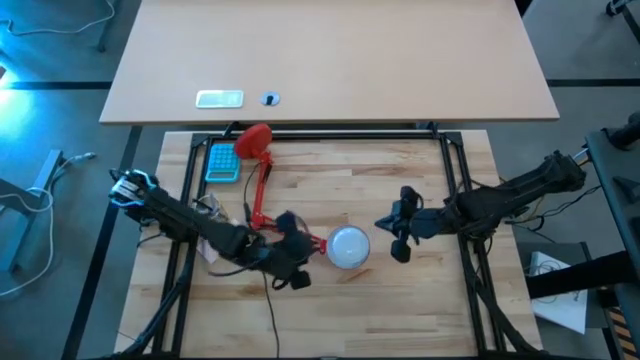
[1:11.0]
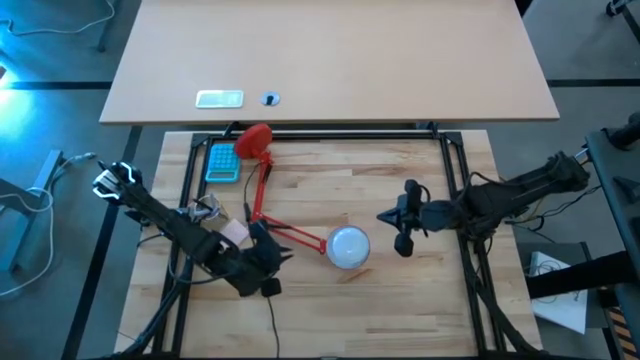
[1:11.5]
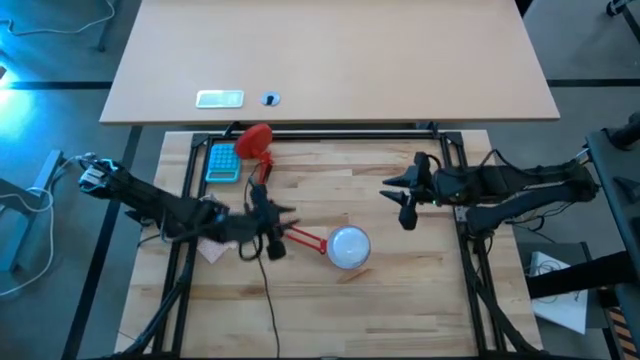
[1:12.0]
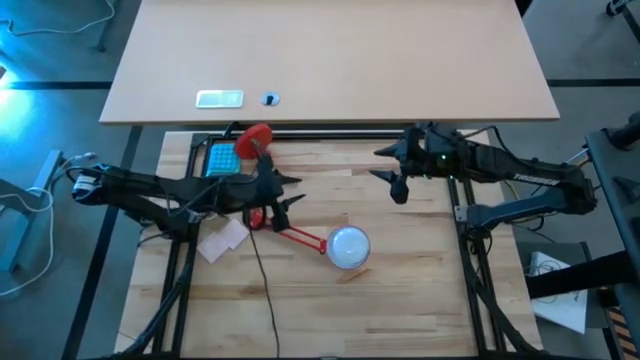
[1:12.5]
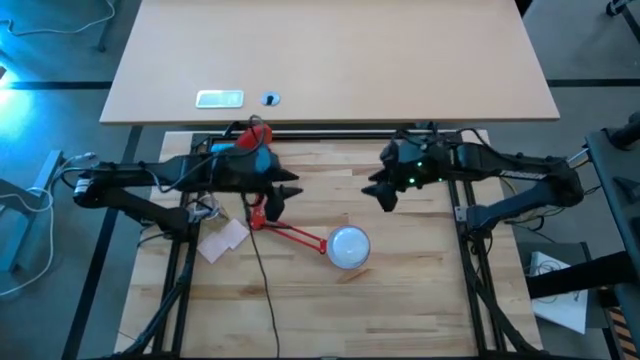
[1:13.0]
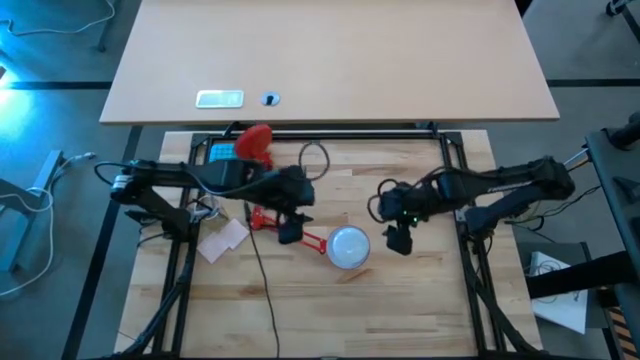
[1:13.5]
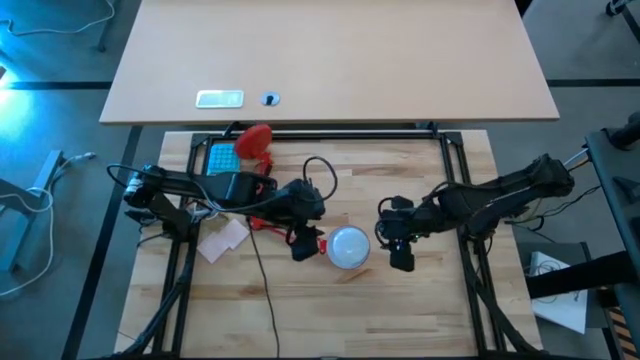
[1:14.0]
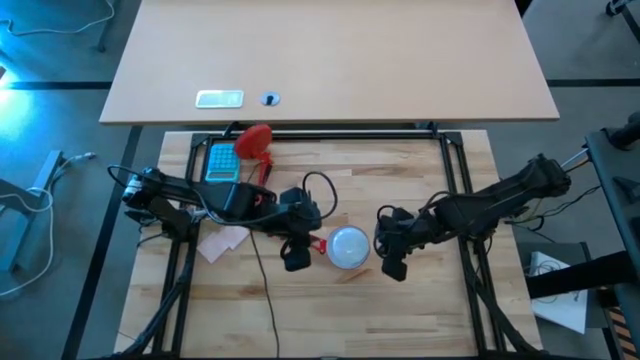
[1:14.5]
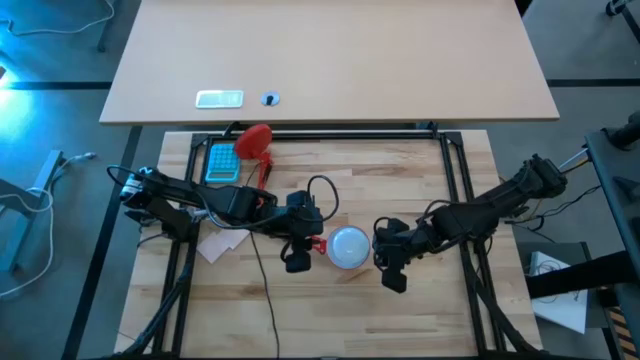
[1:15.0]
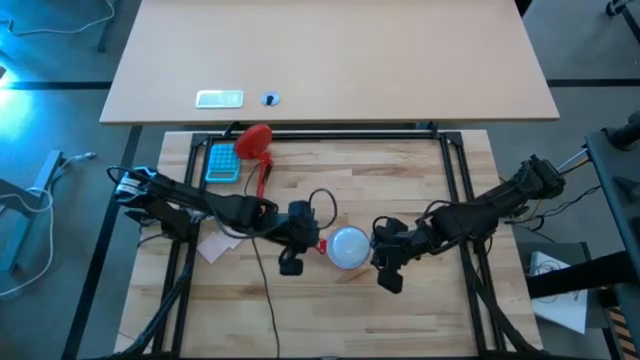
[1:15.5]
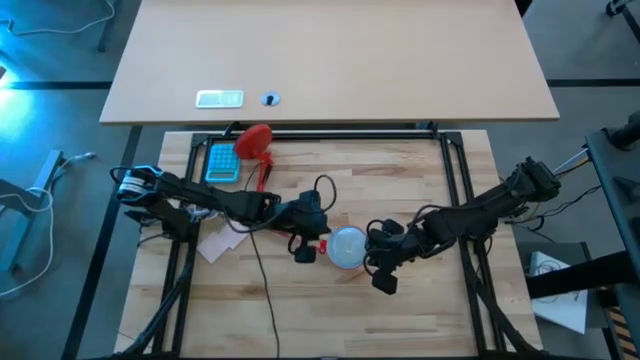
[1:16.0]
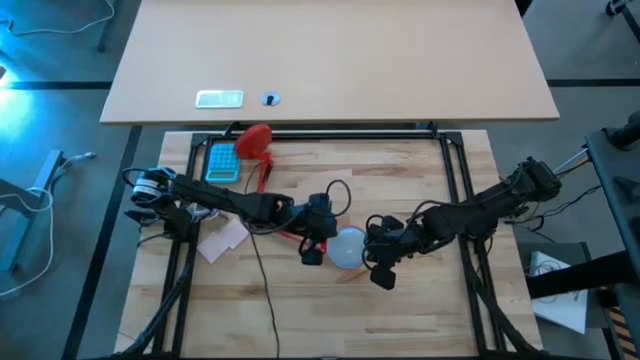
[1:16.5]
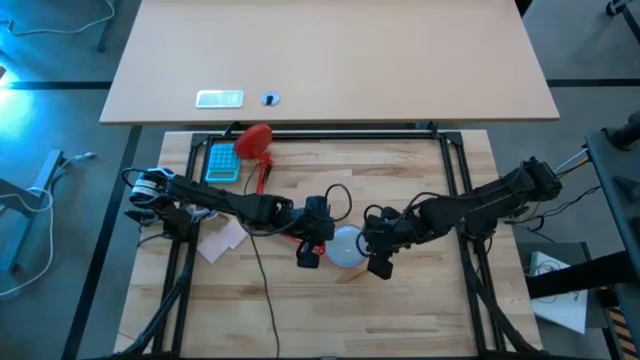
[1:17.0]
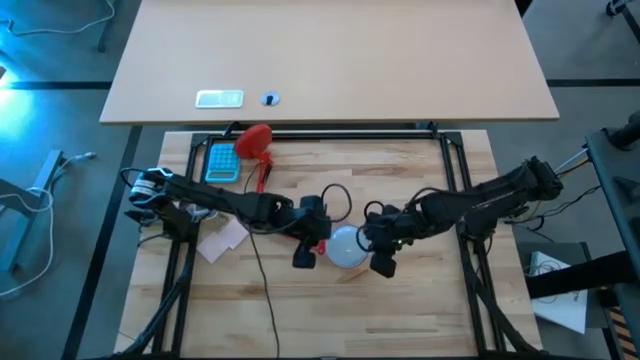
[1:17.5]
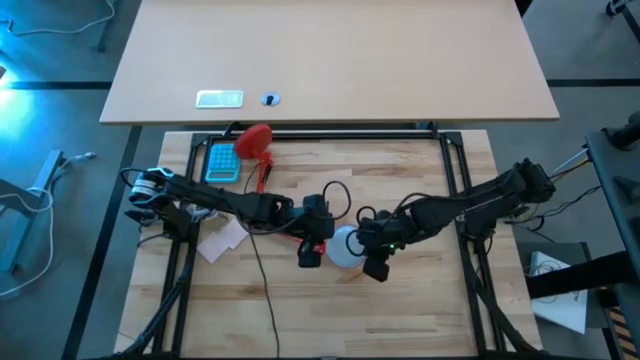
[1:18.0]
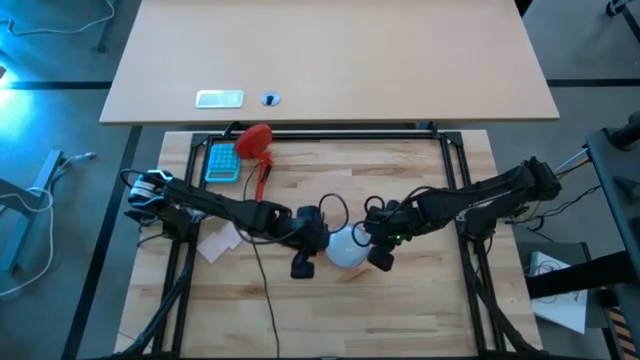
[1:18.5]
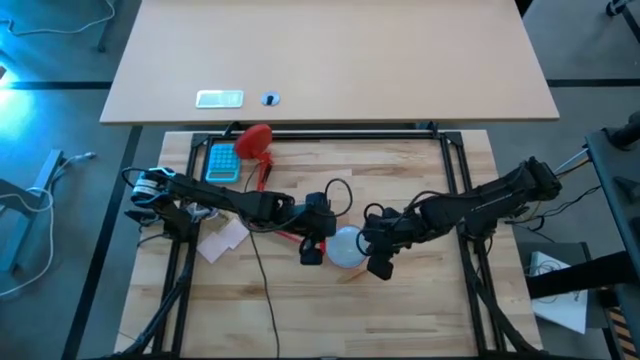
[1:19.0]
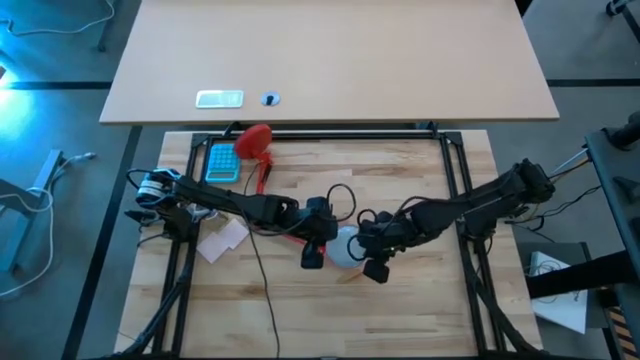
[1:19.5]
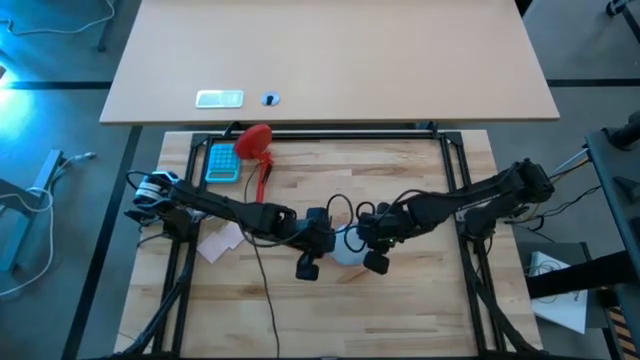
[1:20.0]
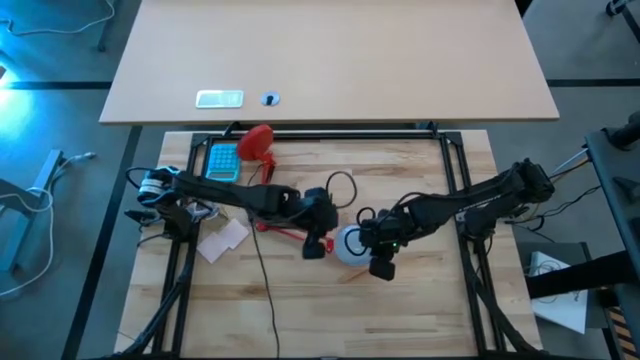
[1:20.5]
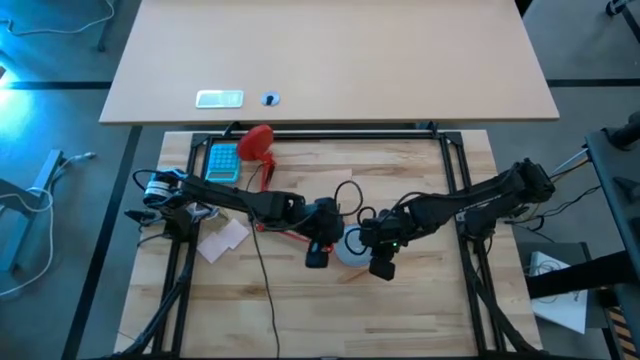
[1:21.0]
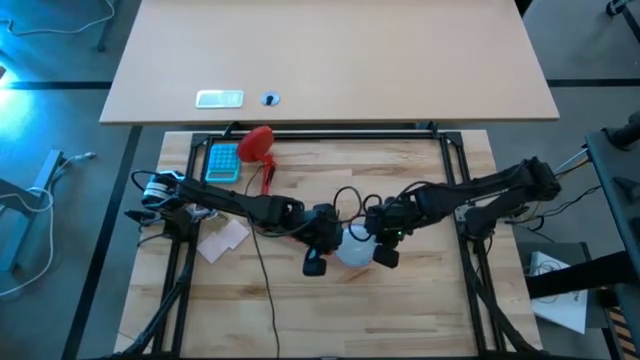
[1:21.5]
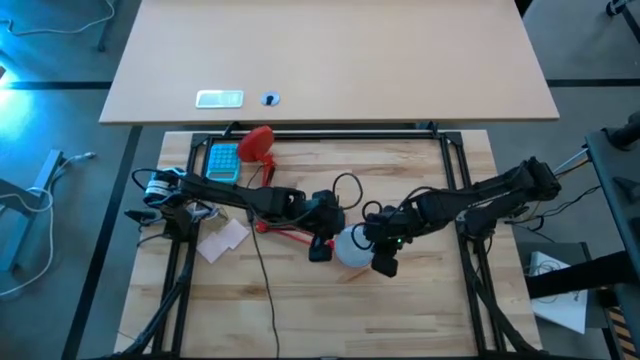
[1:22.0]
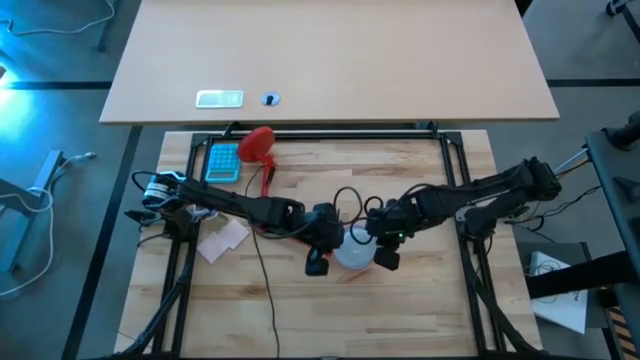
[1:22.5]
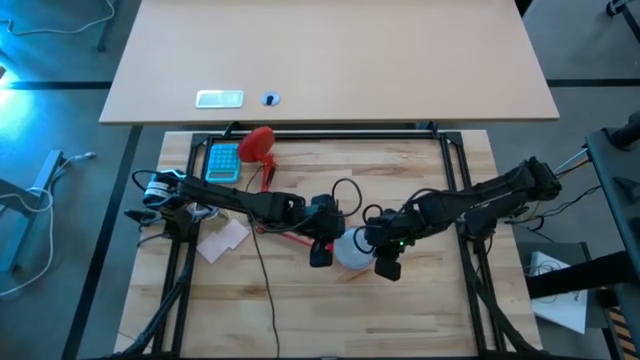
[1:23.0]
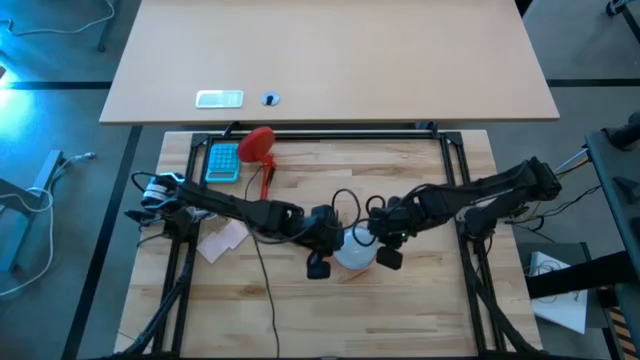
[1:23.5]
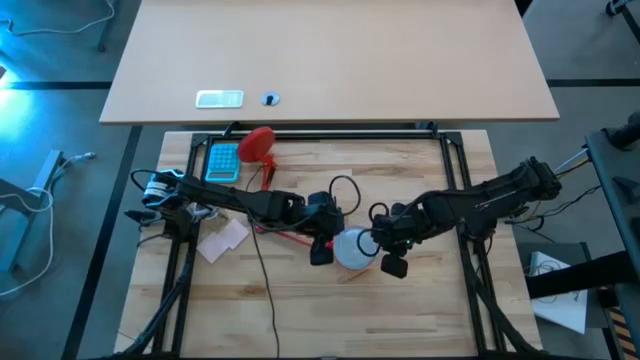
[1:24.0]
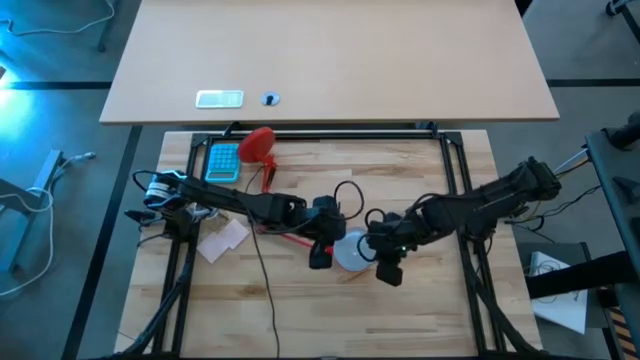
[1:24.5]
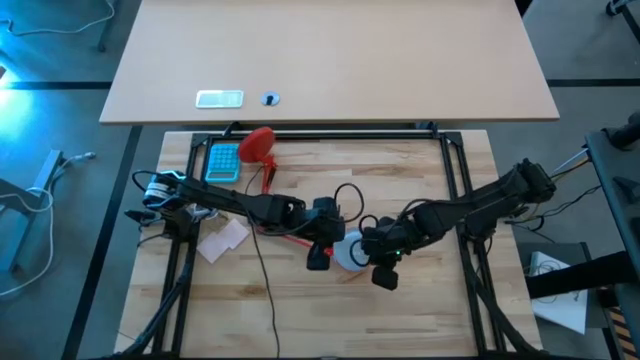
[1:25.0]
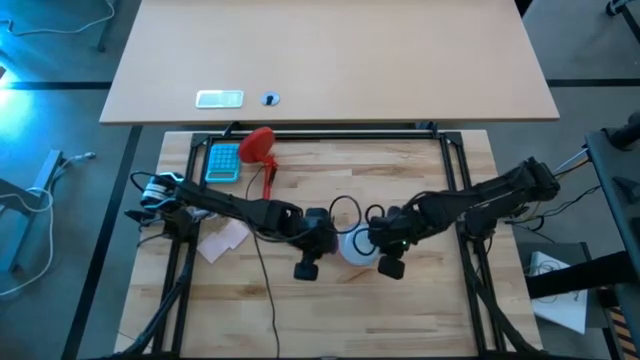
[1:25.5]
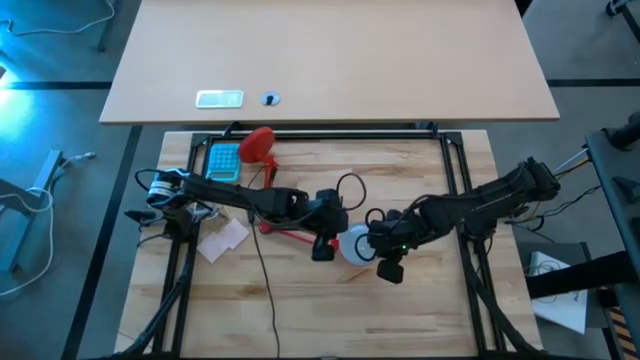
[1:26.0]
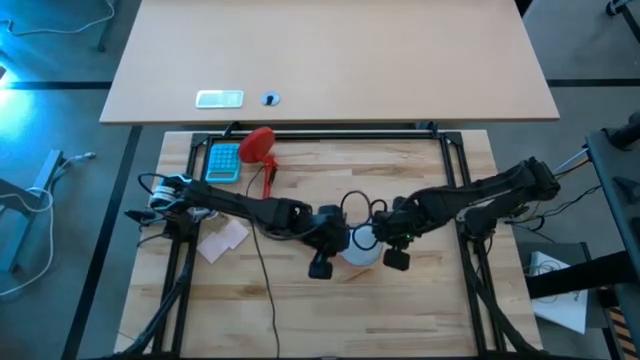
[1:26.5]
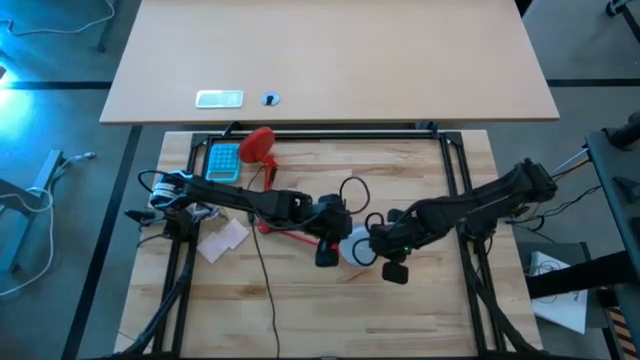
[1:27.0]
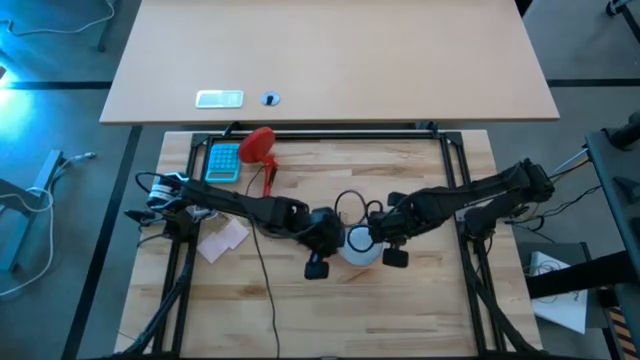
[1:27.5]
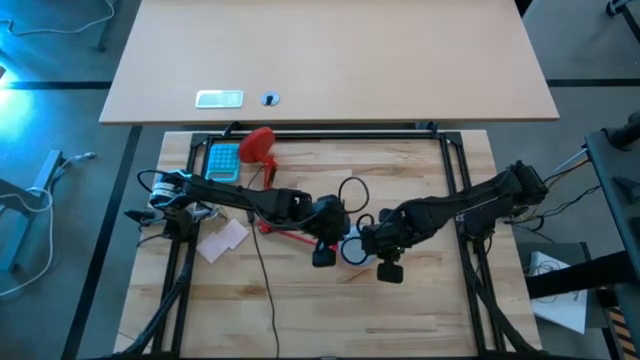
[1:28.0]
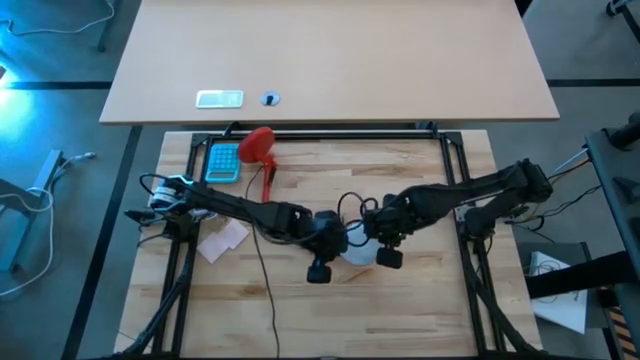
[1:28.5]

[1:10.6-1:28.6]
Task: Screw lightbulb
Remove the light bulb from the lamp
